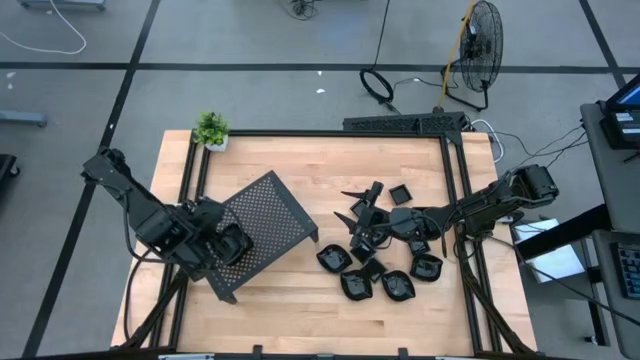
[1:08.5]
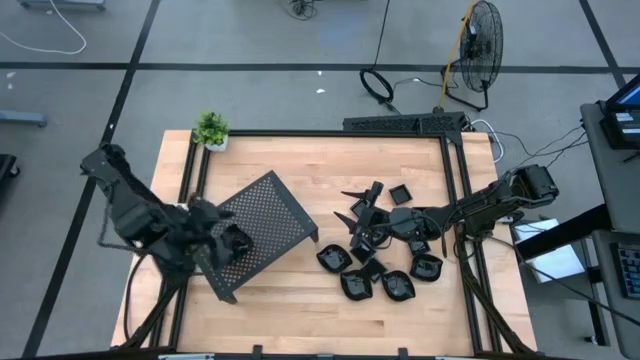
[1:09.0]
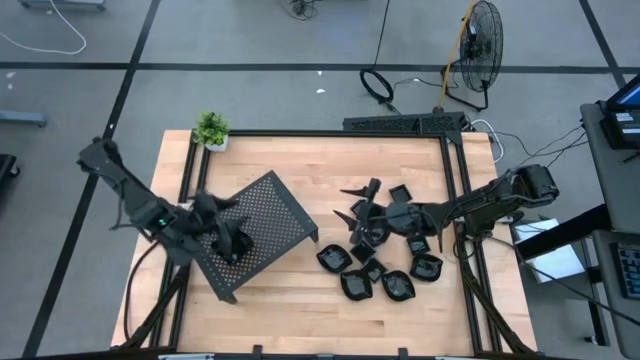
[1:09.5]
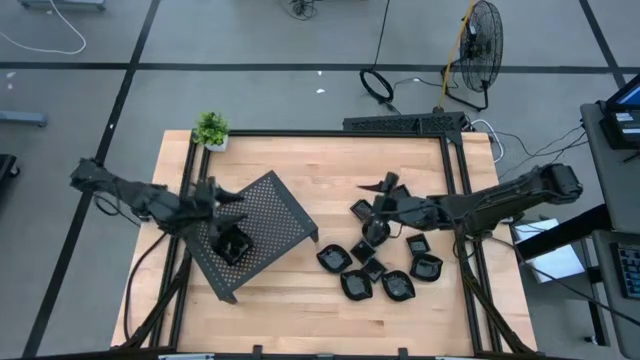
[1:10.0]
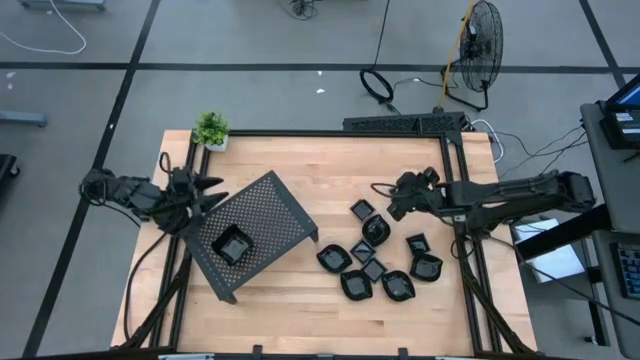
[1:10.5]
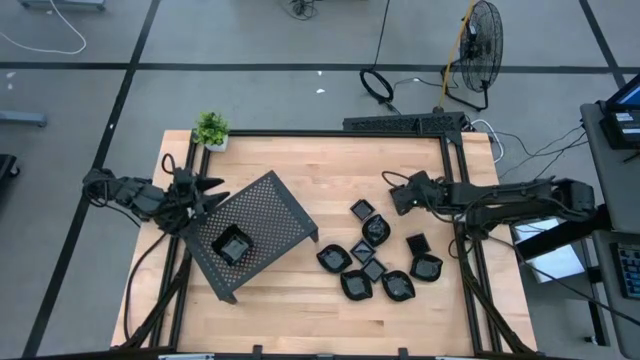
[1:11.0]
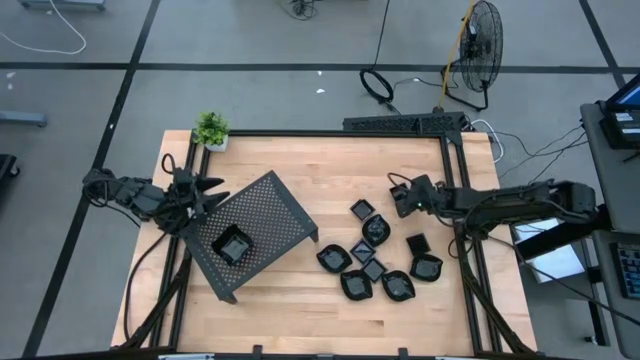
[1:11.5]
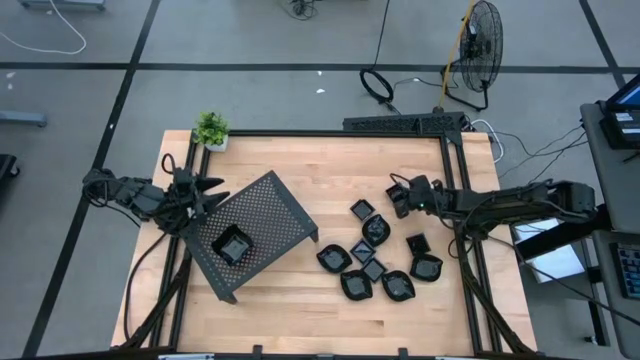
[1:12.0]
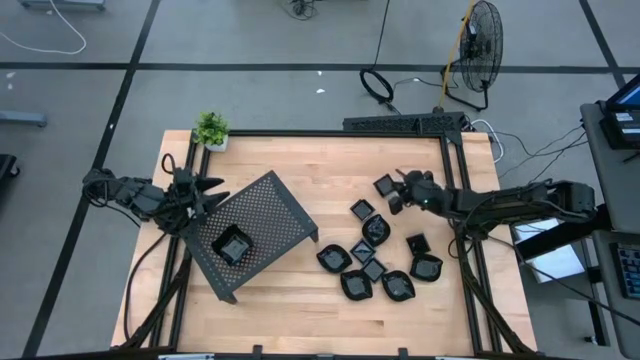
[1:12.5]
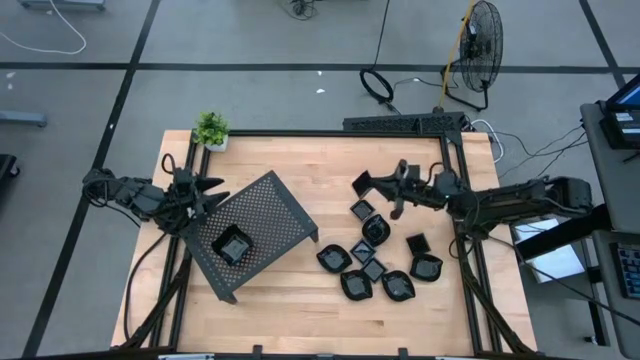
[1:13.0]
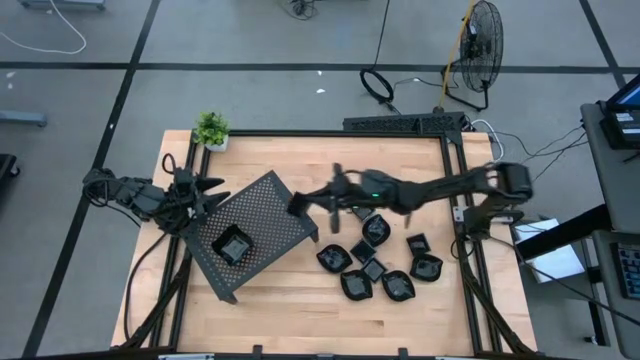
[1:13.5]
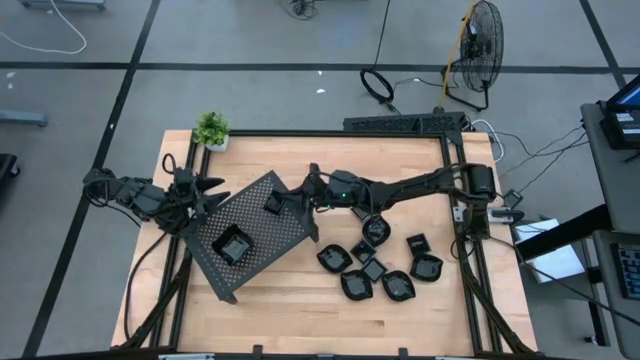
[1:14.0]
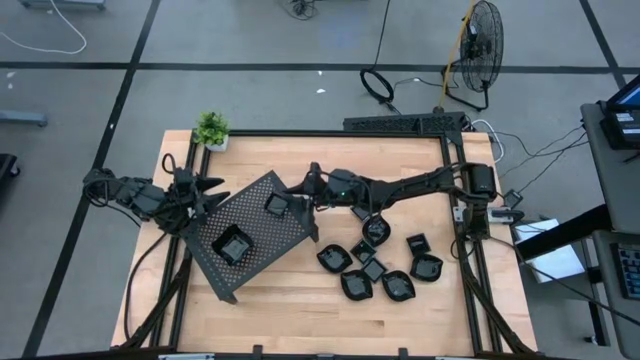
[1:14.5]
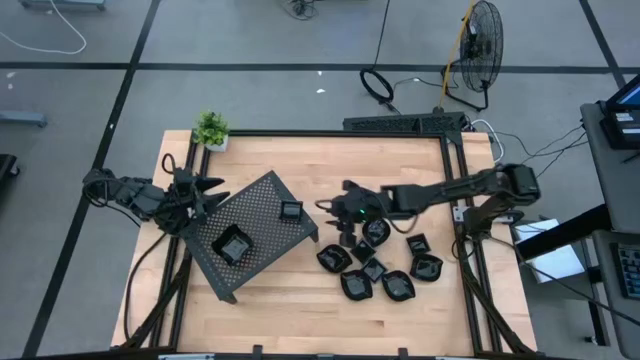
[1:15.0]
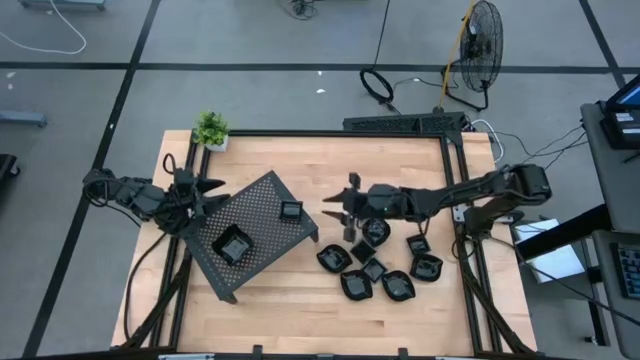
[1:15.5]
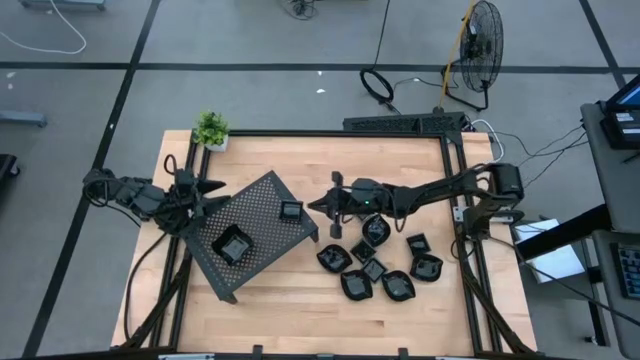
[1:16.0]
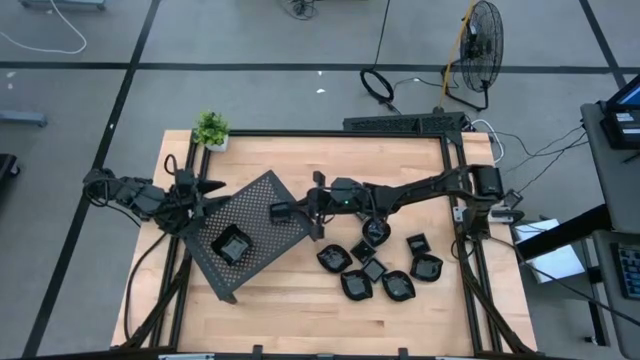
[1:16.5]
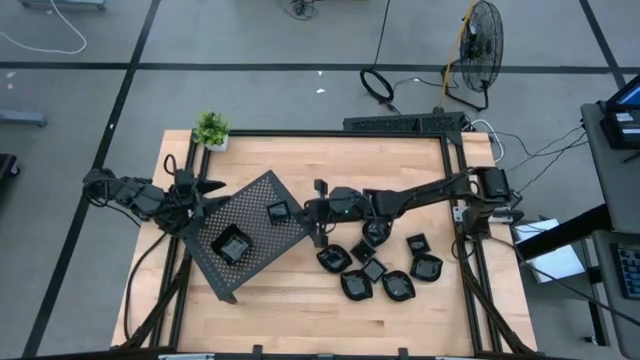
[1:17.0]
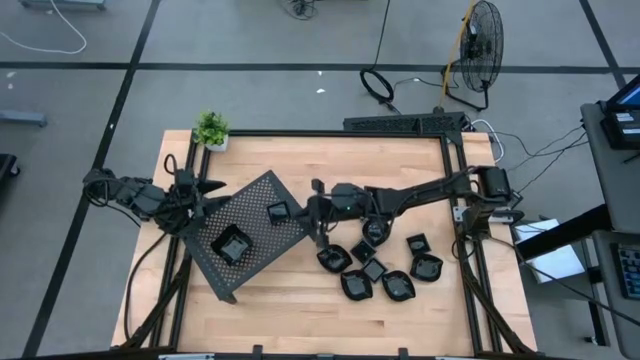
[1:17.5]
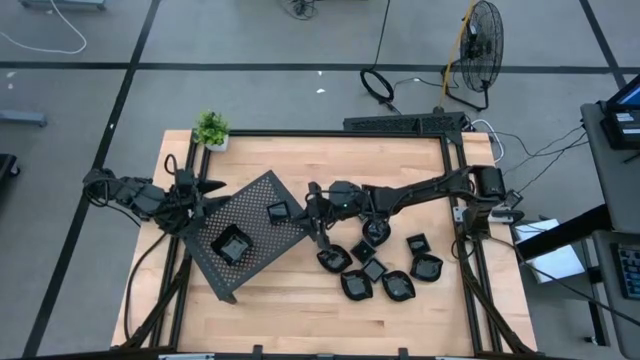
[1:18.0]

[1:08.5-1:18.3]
Task: Pick & Place Mini shaped plates
Put the square plate on the shelf

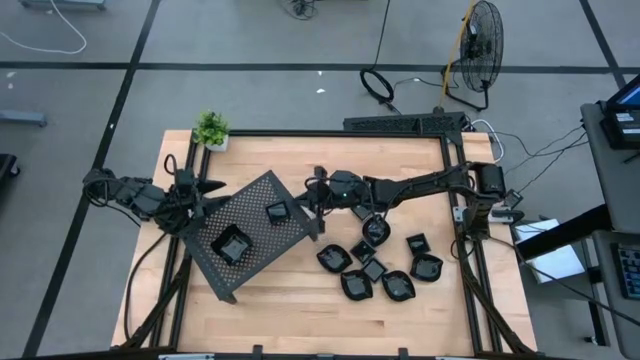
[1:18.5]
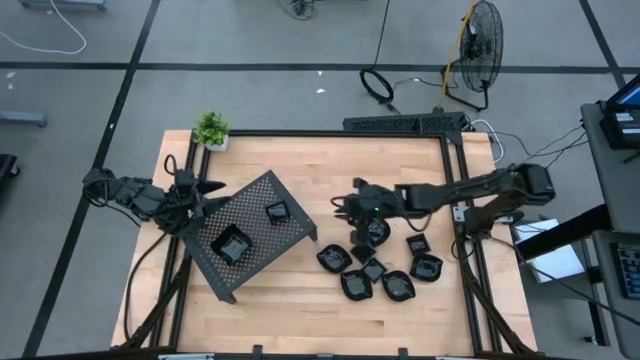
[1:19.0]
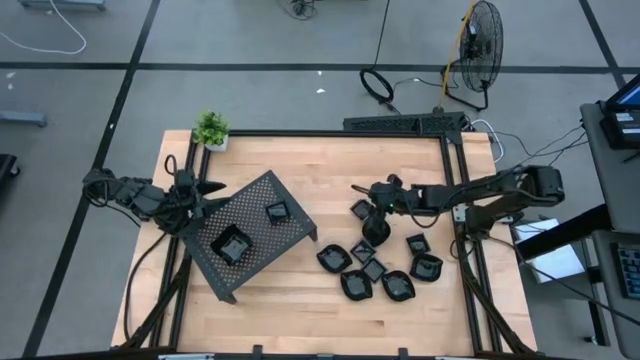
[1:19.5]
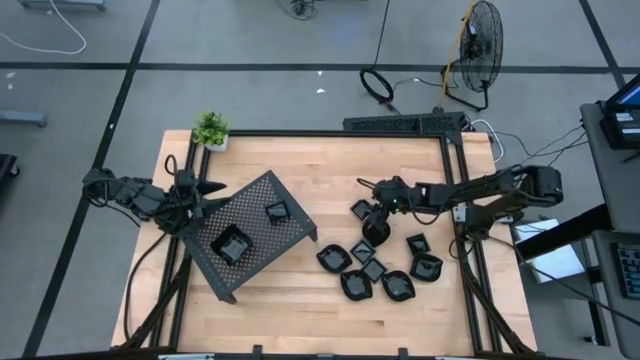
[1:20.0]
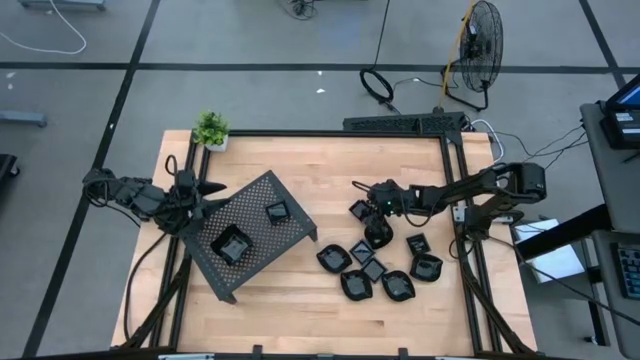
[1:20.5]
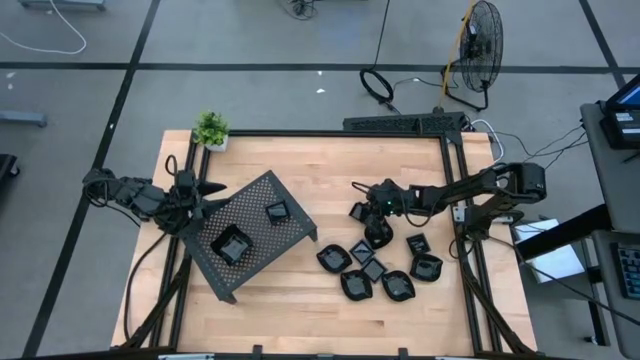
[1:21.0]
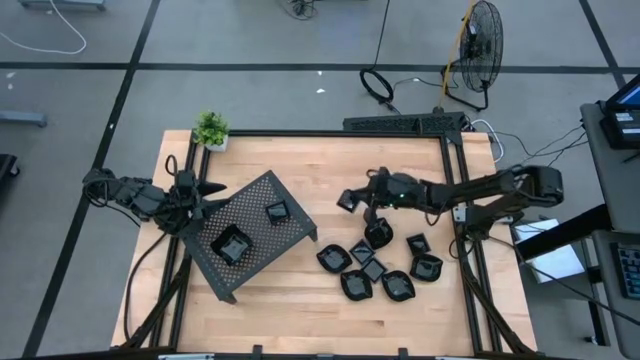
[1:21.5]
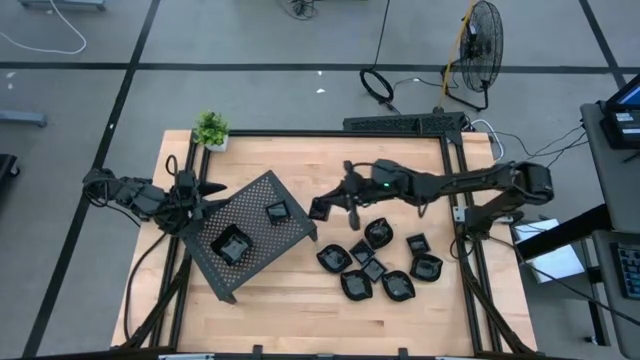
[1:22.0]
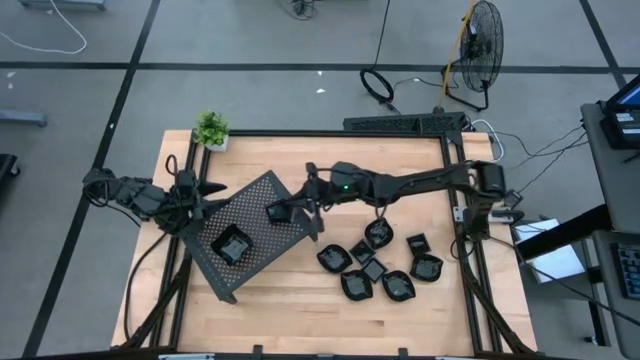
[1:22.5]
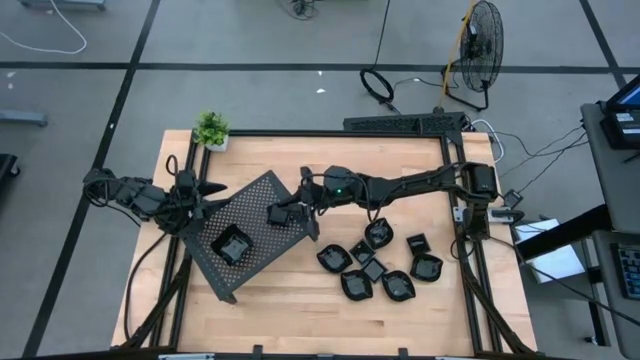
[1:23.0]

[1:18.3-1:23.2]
Stack the square plate on top of the square plate on the shelf

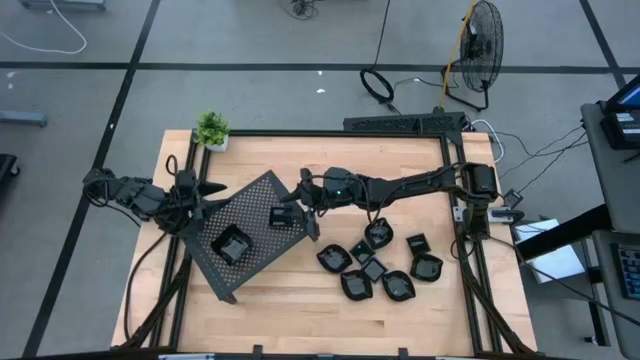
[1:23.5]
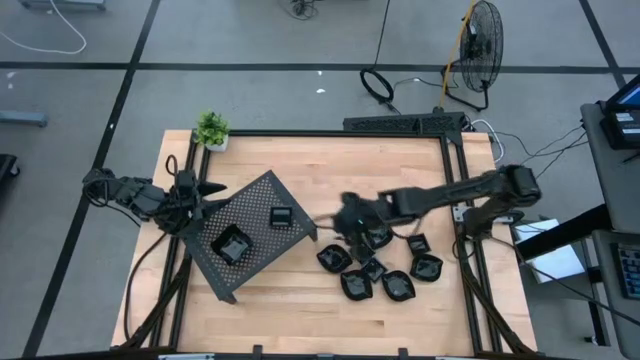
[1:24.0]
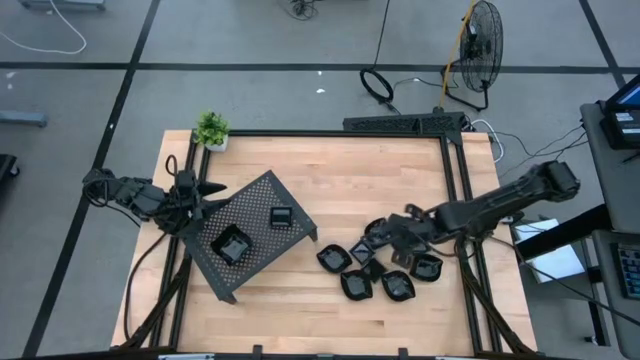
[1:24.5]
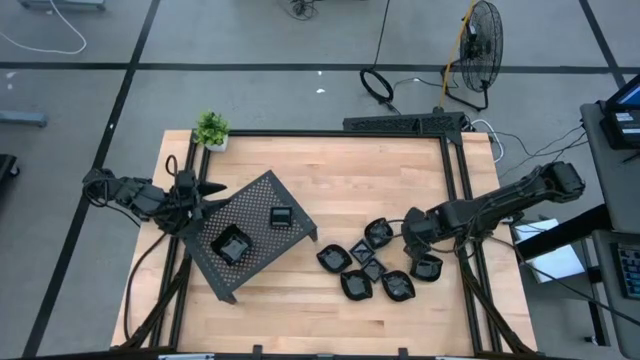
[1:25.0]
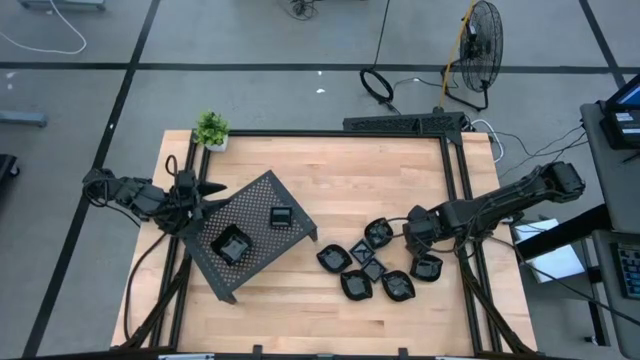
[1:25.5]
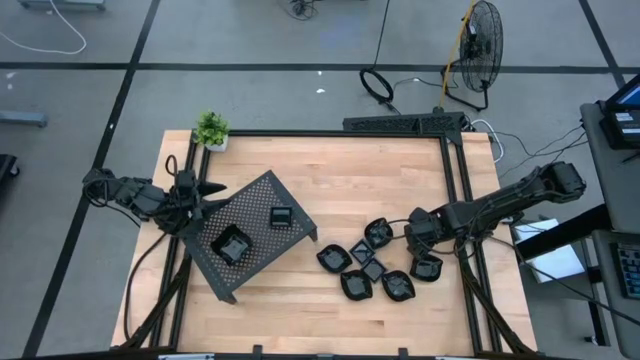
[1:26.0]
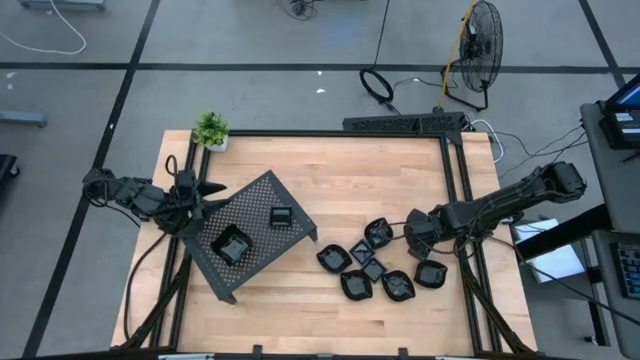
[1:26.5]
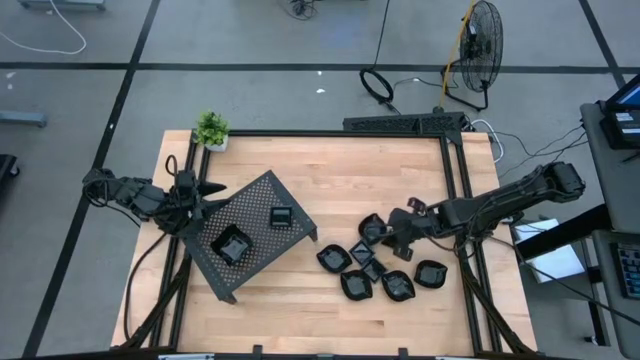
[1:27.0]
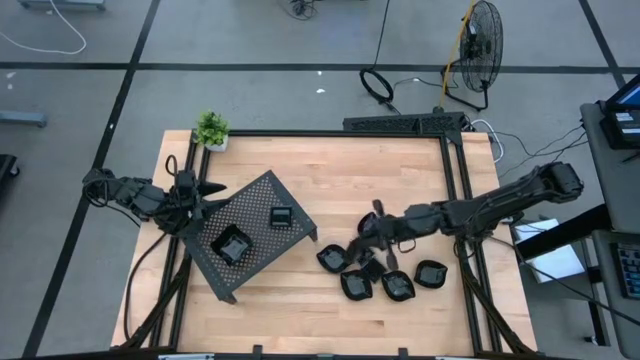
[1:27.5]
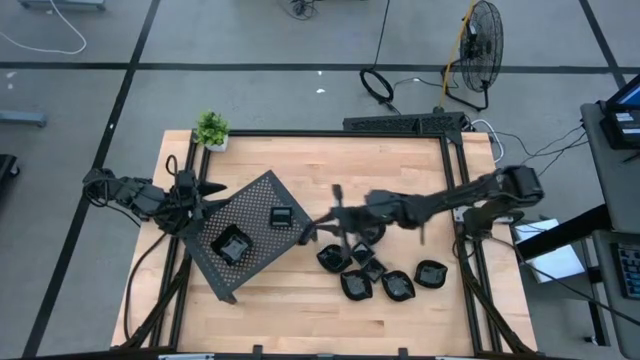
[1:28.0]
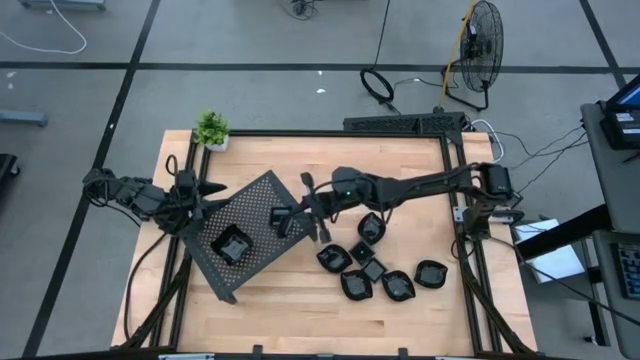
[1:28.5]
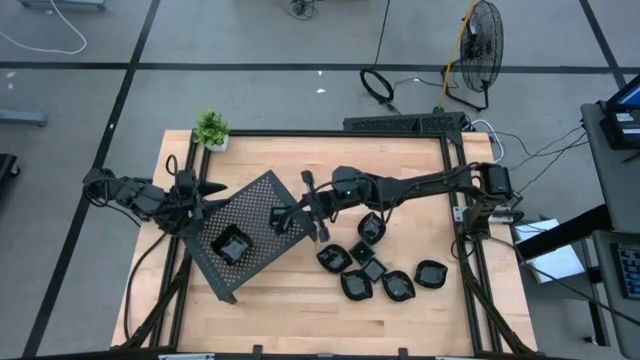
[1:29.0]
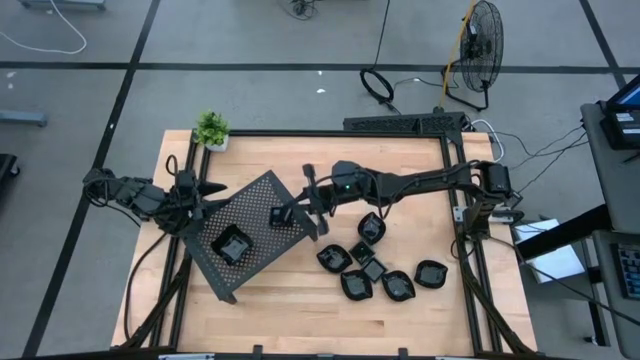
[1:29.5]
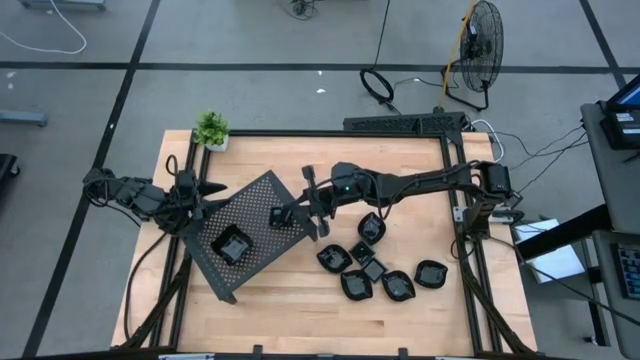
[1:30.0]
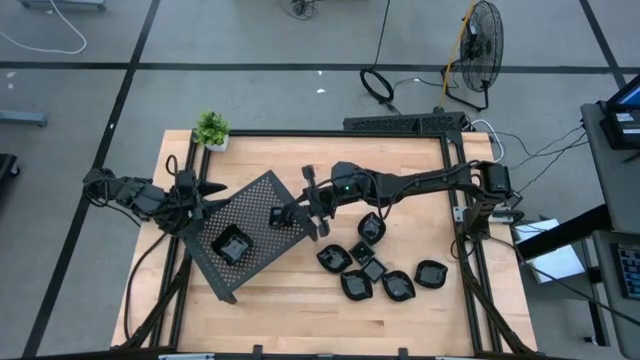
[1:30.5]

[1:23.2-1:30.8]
Stack the square plate on top of the square plate on the shelf
